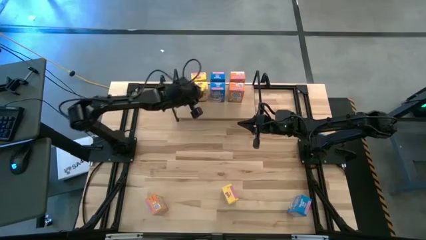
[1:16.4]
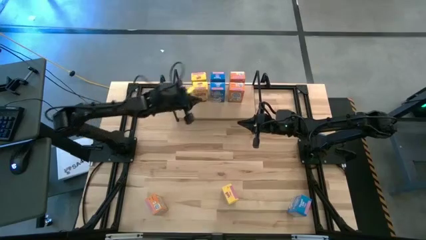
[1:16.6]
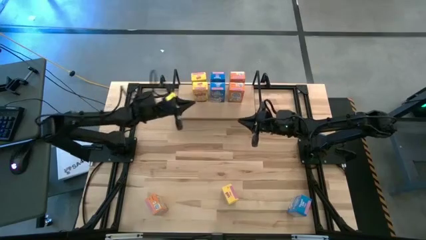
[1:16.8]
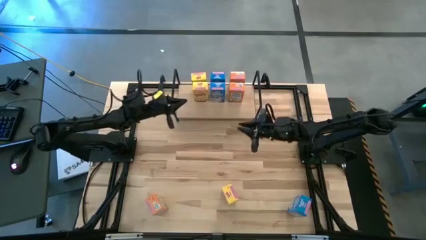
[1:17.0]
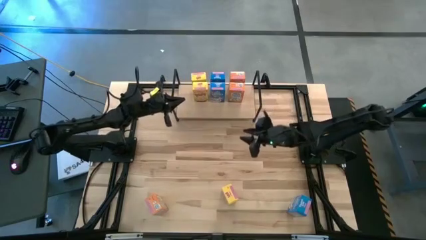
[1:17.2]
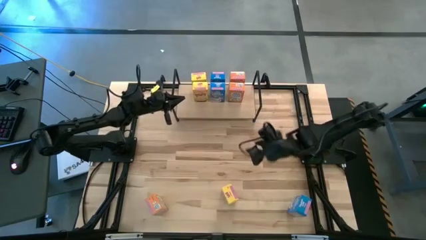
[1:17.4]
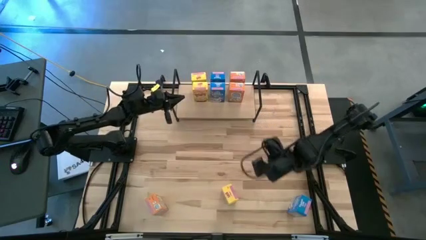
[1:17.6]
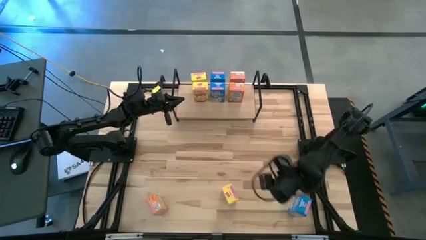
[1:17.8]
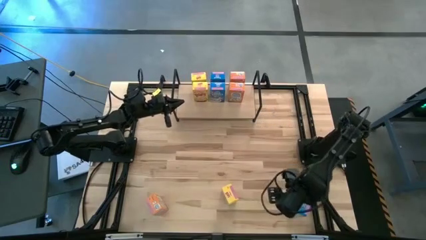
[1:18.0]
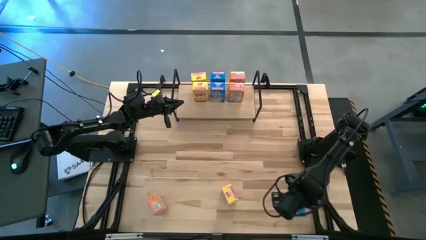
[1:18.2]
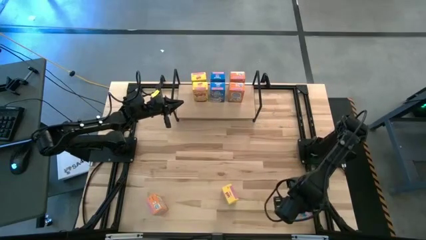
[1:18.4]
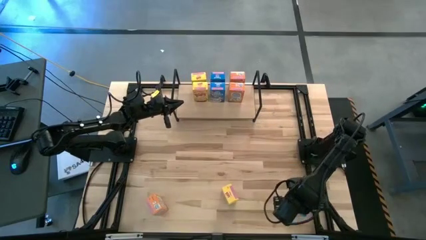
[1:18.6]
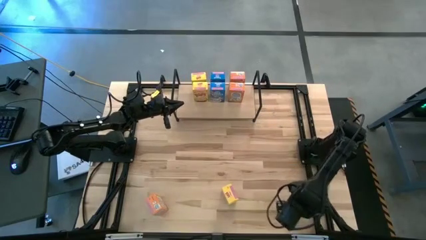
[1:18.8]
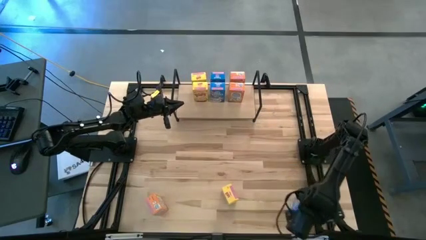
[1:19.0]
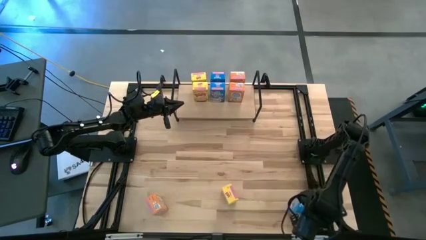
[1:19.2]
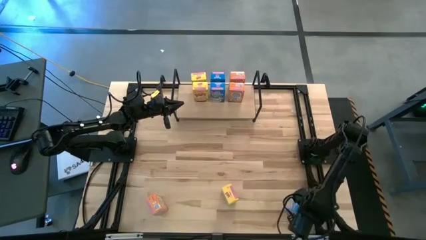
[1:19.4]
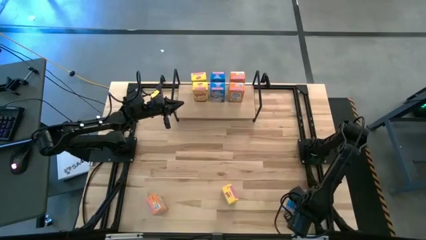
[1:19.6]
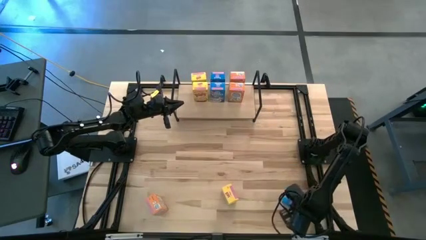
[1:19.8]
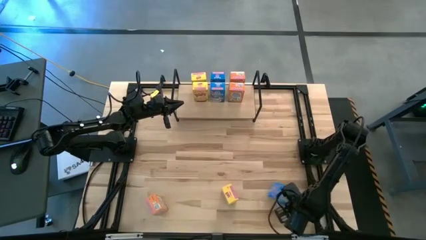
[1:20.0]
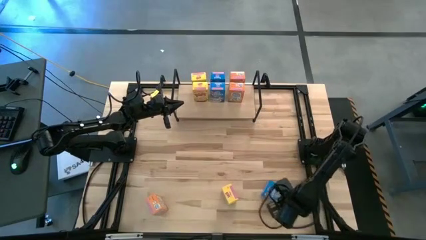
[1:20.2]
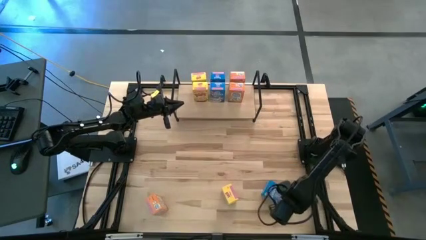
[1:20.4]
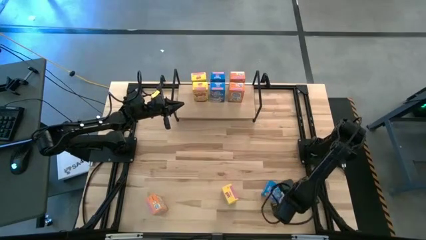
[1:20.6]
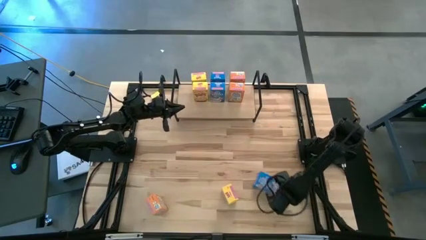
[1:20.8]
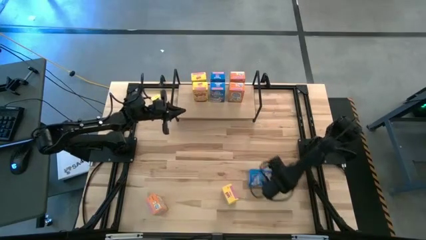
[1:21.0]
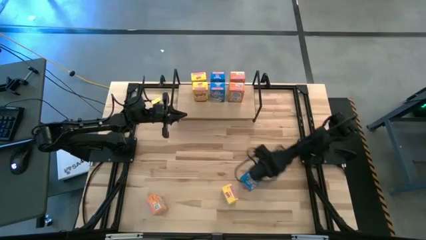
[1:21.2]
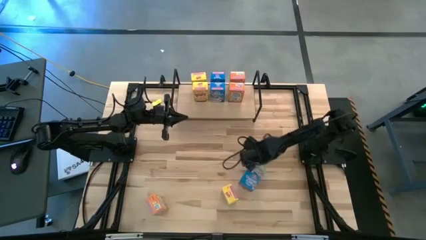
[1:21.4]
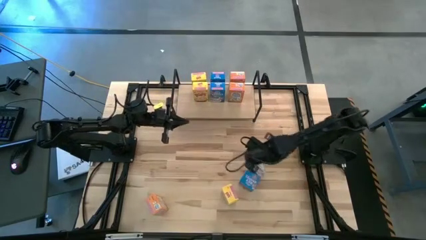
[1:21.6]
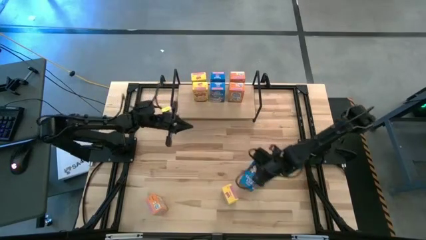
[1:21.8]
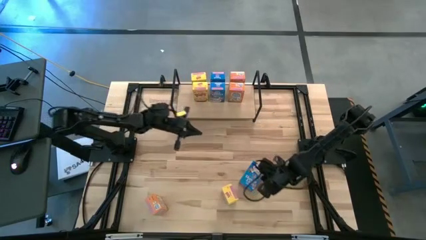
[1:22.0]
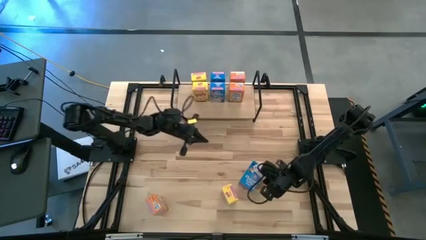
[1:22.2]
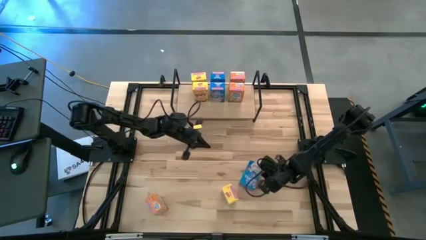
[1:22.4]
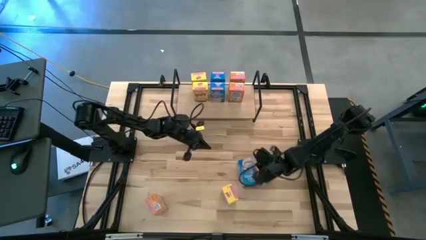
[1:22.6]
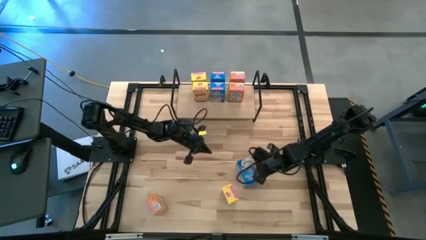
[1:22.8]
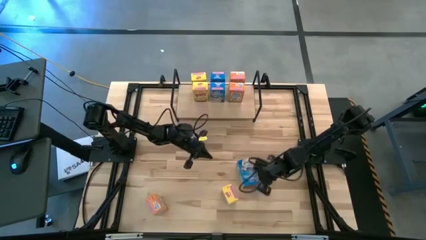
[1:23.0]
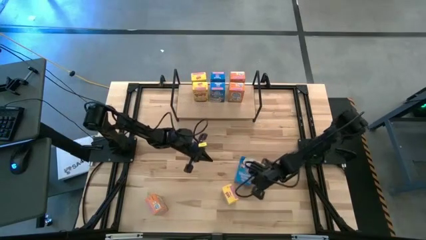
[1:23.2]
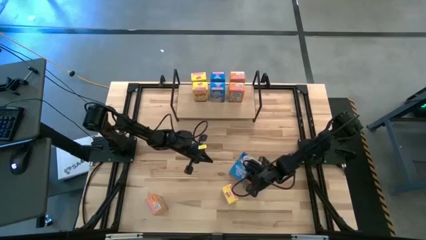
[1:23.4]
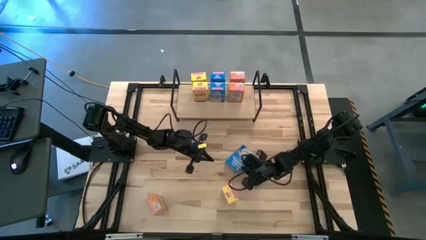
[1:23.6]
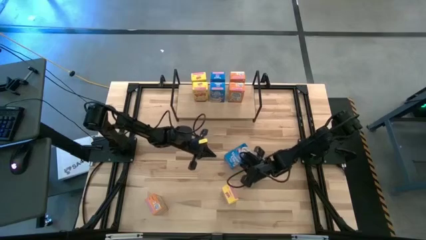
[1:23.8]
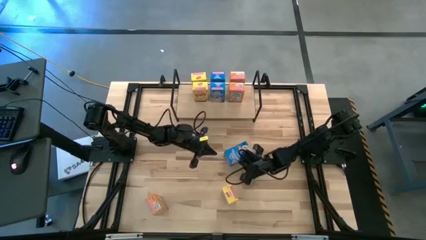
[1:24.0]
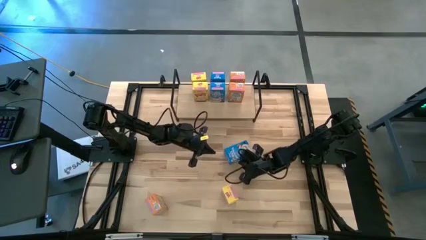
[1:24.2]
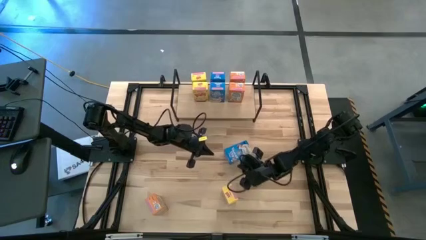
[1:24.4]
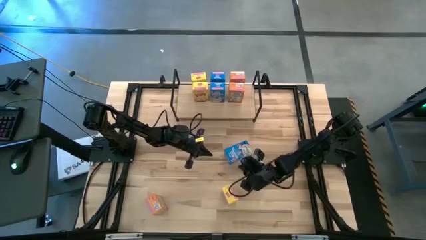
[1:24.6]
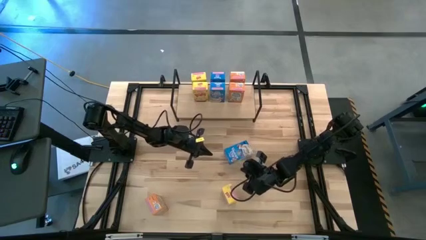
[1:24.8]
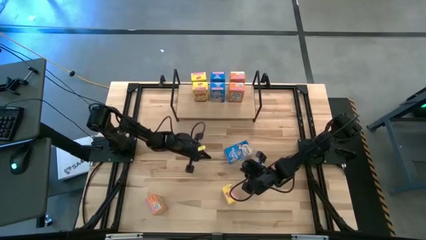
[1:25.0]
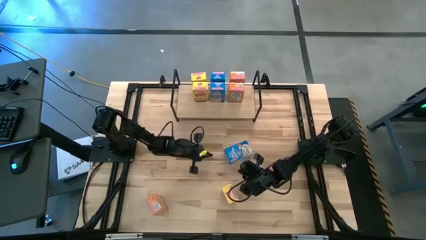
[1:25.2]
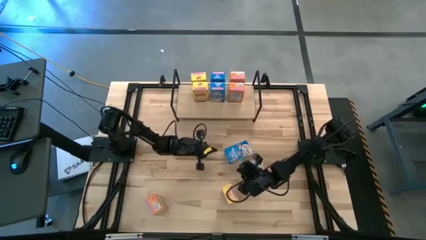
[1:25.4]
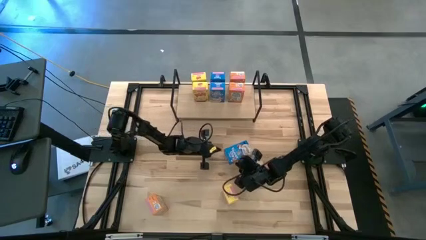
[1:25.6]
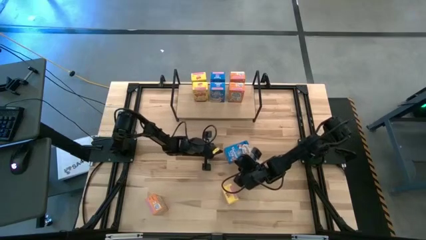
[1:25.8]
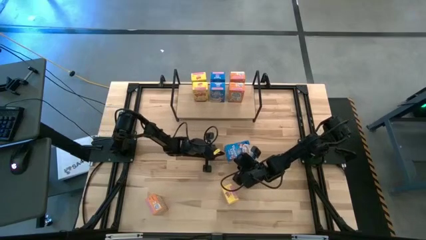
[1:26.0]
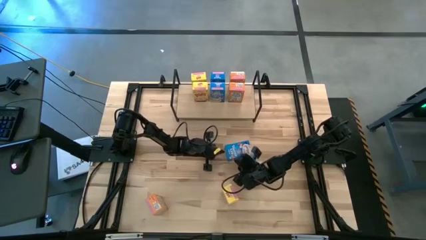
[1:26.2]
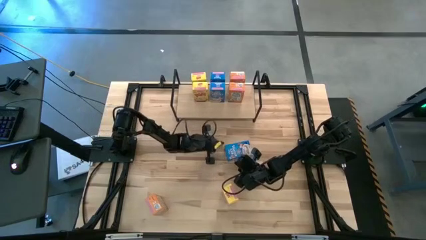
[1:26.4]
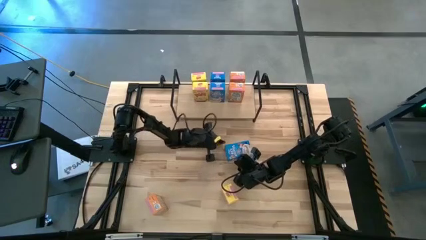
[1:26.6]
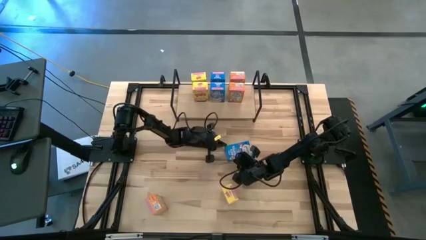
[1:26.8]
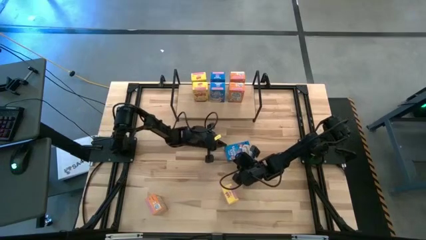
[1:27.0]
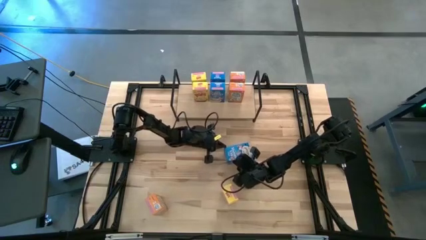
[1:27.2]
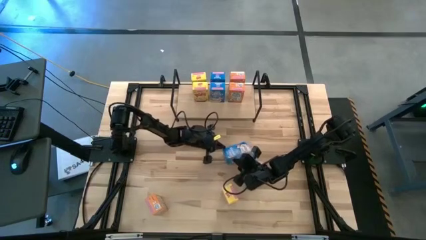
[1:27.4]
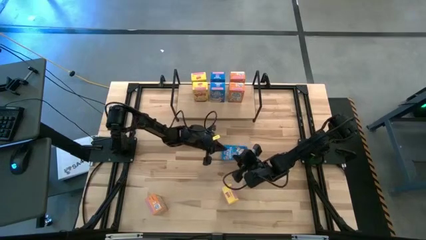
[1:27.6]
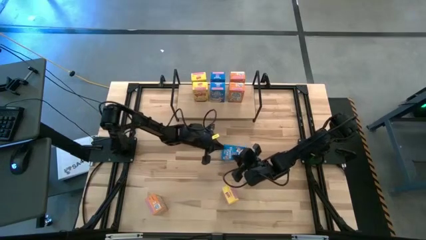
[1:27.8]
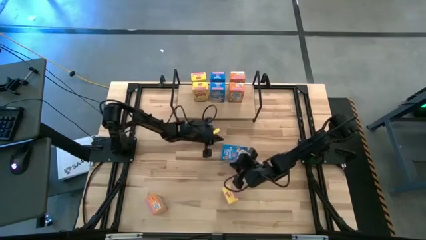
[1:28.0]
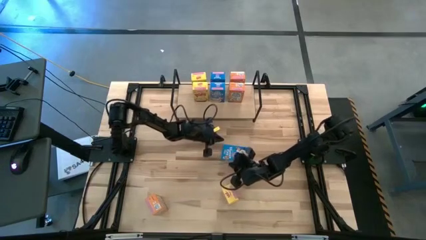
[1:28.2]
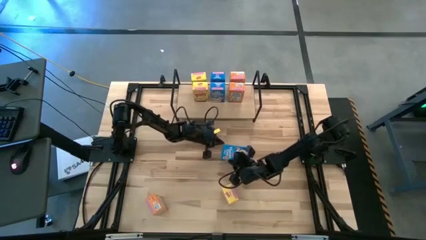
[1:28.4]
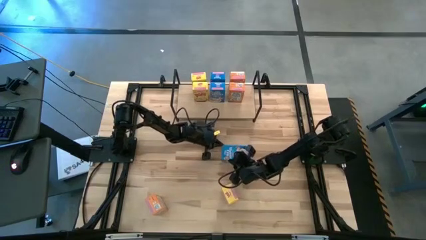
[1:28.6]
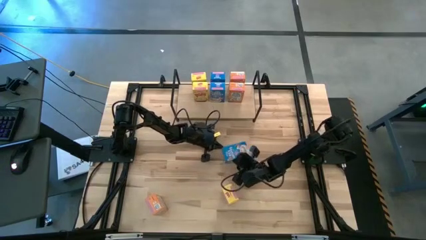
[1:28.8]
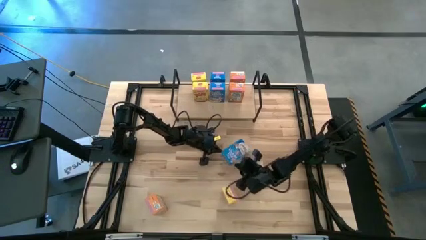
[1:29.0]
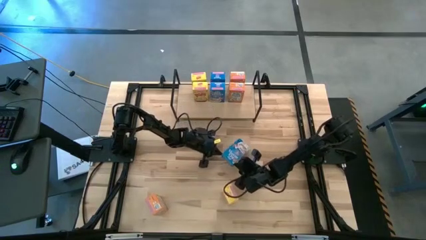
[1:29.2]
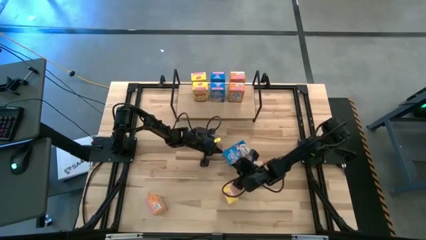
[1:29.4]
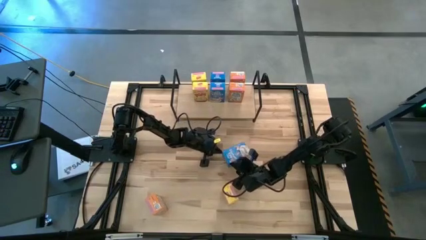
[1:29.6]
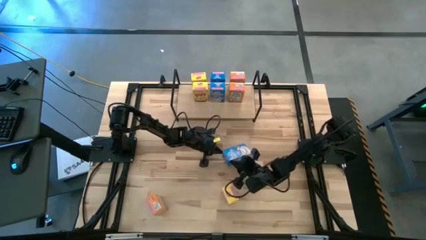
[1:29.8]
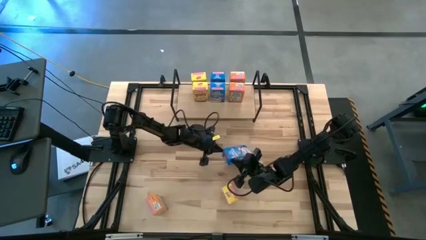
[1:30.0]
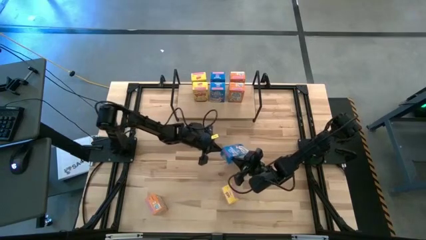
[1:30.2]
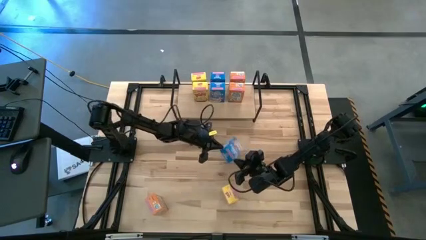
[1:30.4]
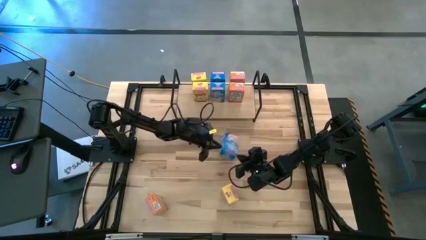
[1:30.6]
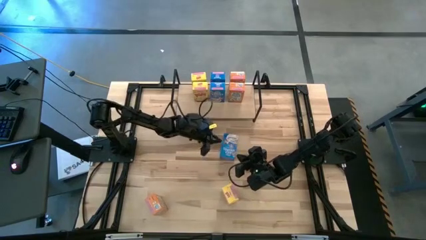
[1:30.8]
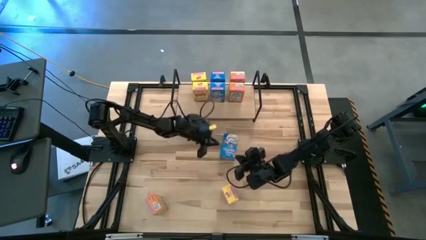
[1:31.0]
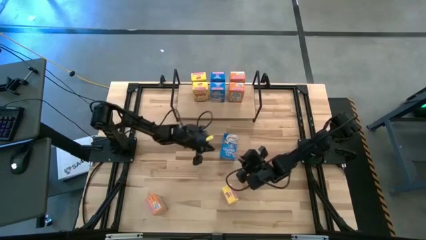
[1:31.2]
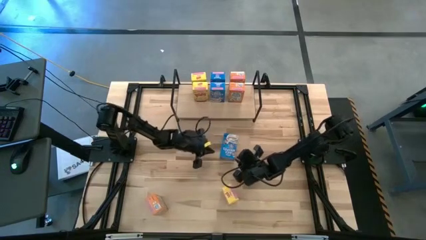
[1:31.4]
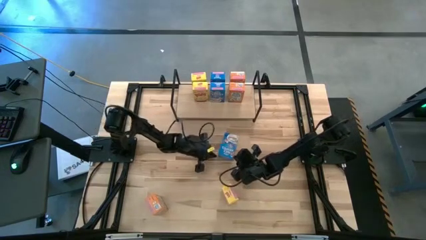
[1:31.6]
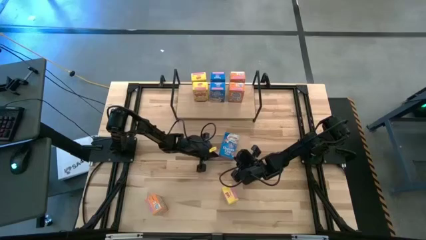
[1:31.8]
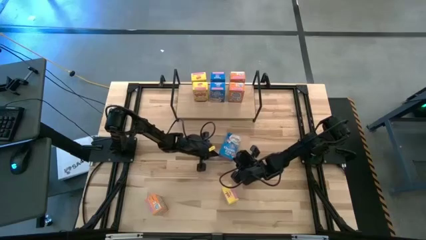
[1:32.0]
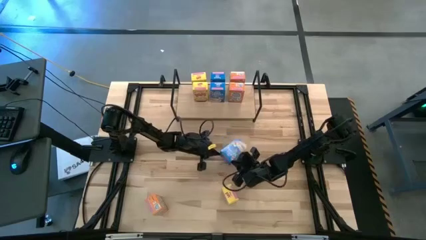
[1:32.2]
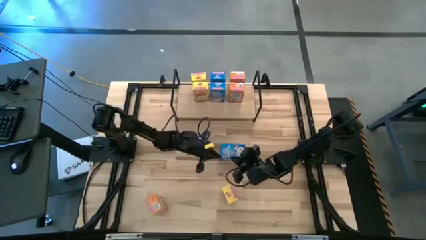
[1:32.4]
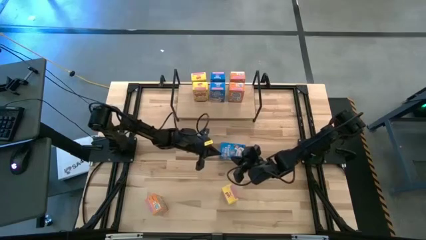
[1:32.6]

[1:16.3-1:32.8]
Task: Stack cereal on shelf
Put the blue cereal box on the shelf aligned with the other blue cereal box
